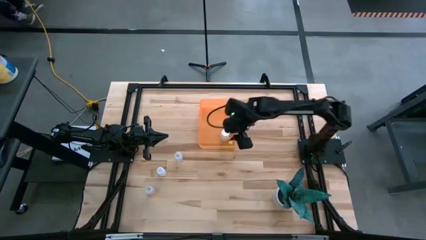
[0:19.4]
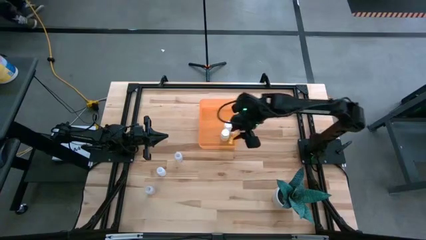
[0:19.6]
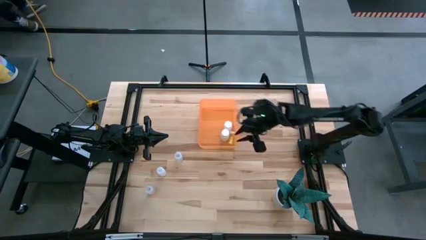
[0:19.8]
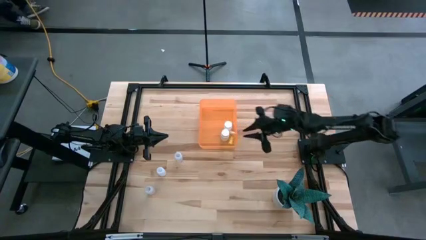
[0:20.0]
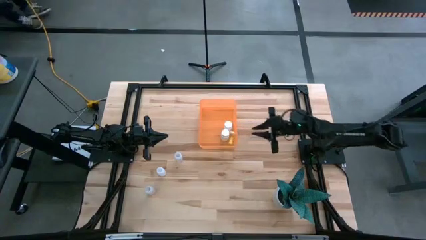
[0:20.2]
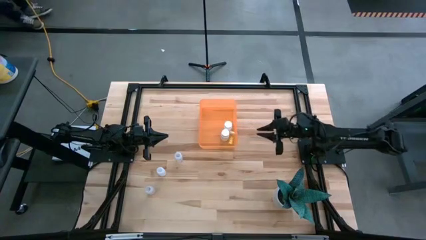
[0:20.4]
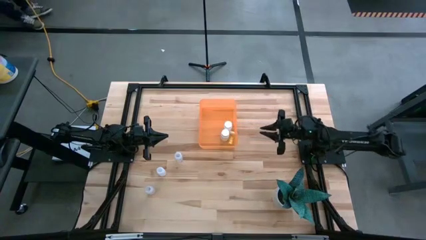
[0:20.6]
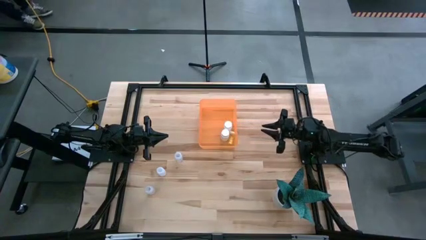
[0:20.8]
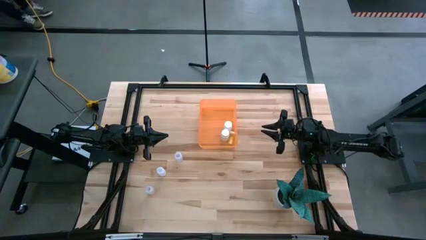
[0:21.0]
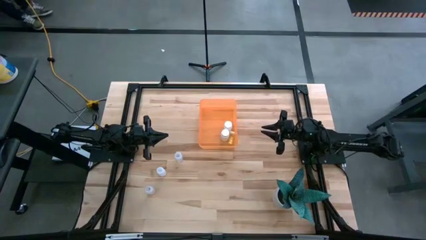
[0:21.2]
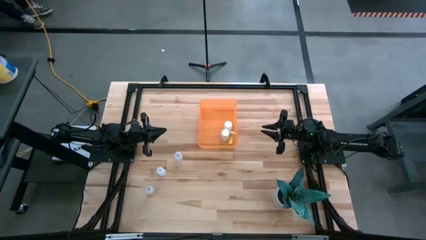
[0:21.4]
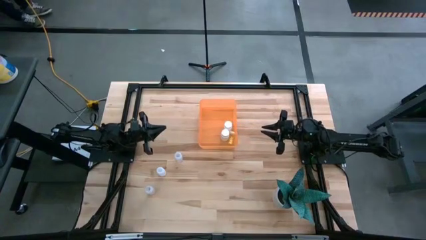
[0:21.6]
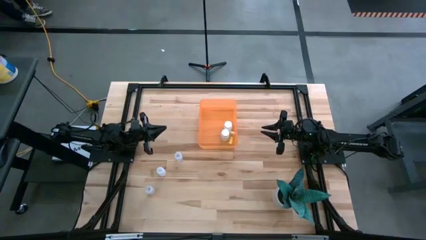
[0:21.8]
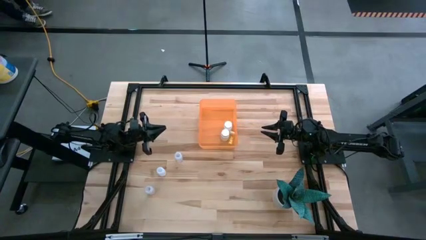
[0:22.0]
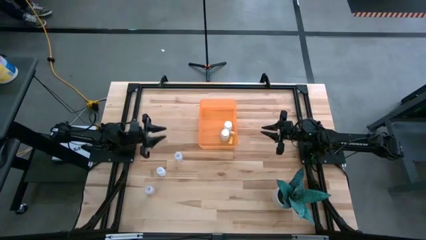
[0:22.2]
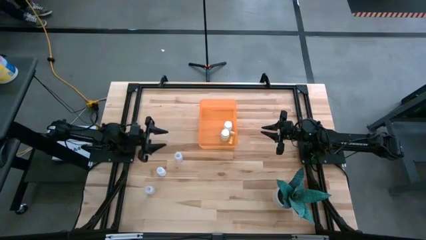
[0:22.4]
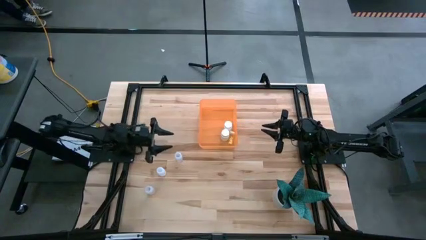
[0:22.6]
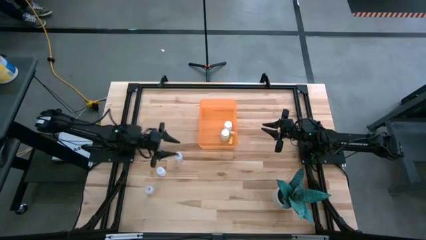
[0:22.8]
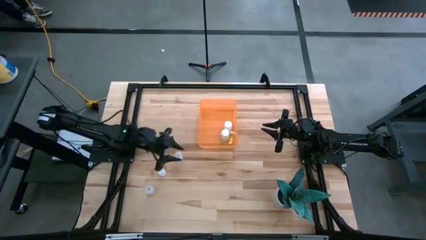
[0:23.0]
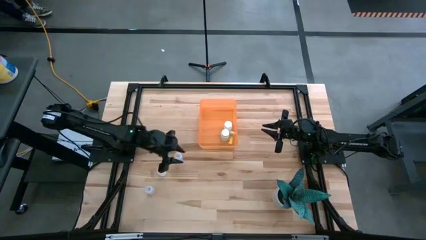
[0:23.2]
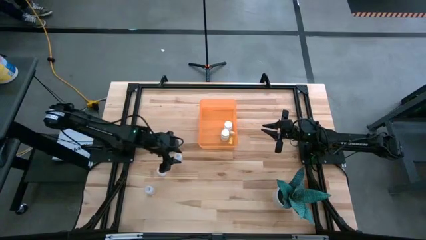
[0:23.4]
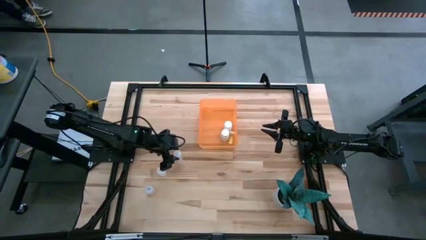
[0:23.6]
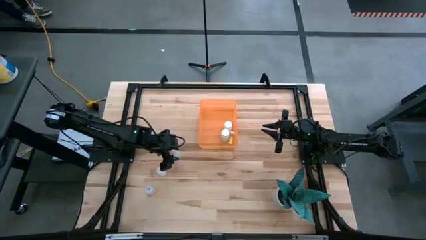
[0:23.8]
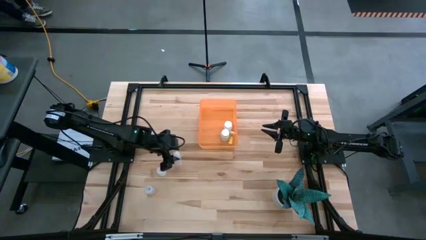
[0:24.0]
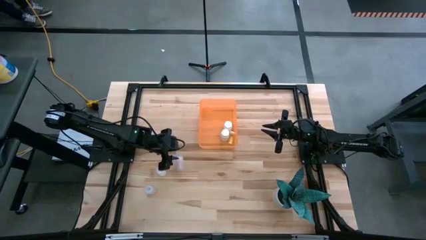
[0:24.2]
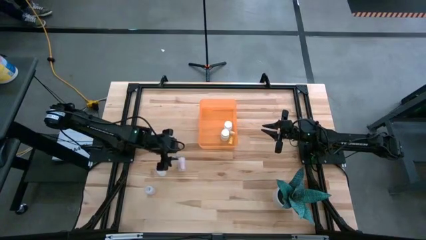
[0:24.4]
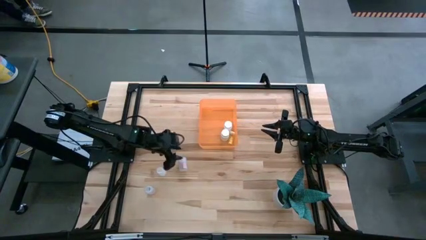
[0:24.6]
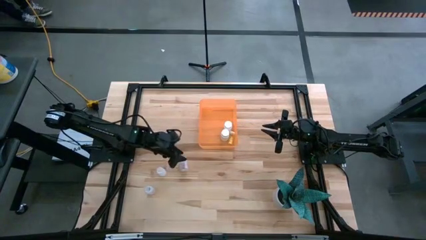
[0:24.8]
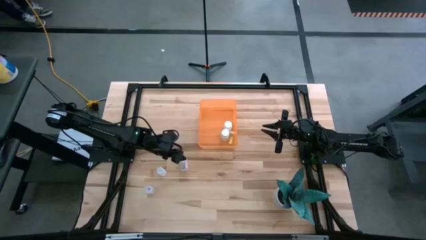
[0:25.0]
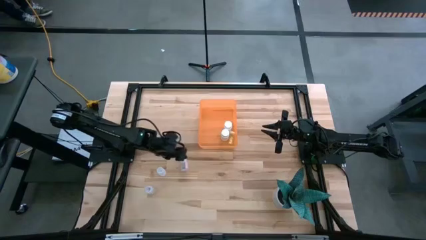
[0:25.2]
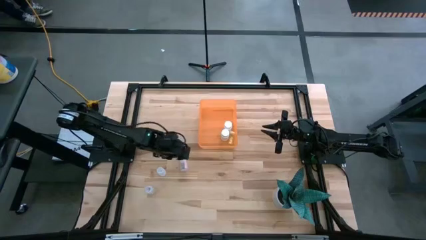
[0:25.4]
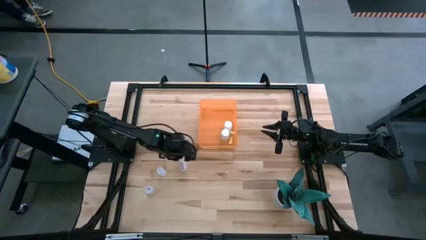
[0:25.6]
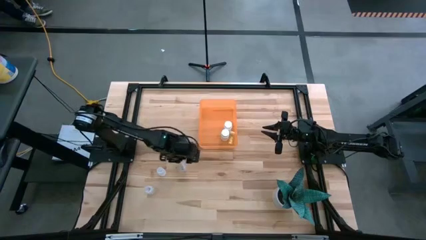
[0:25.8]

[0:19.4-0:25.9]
Task: Pick and place pill bottles into a basket
Put the top transparent medicine bottle into the orange bin

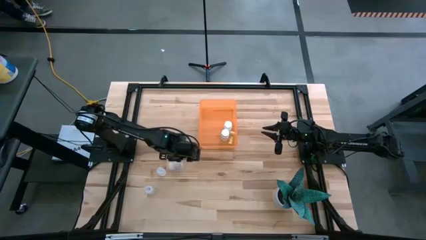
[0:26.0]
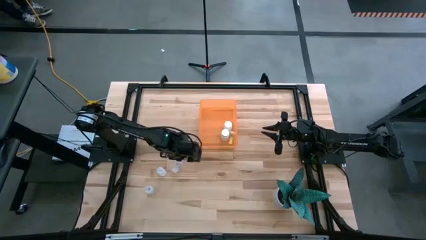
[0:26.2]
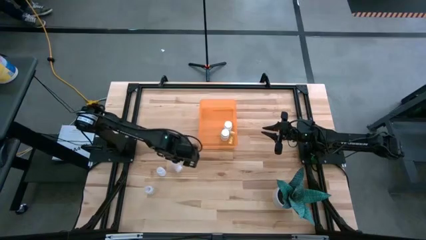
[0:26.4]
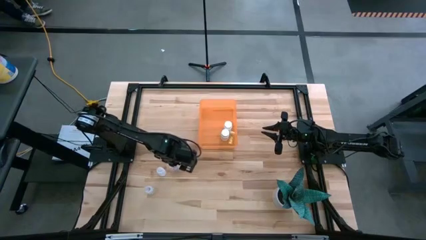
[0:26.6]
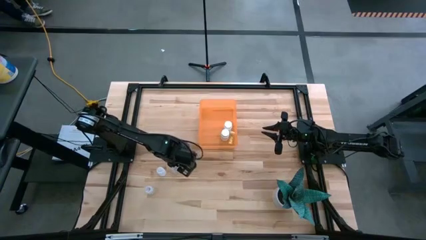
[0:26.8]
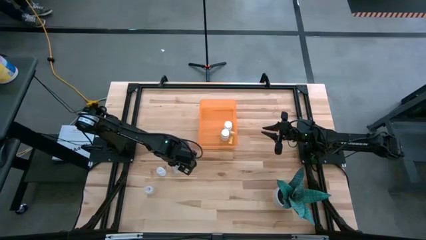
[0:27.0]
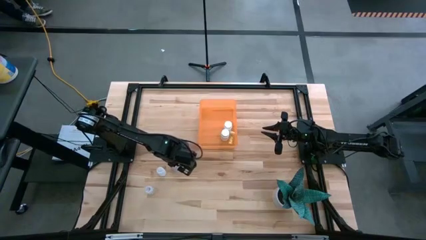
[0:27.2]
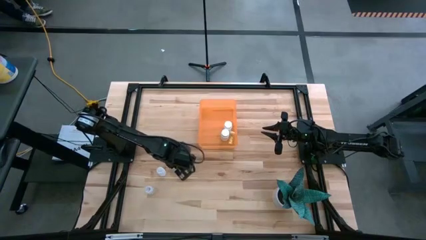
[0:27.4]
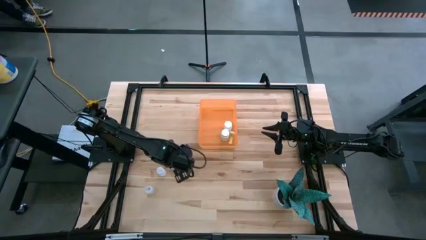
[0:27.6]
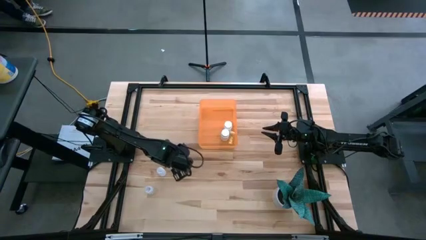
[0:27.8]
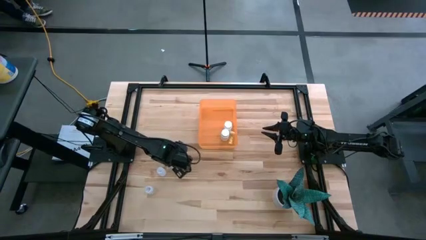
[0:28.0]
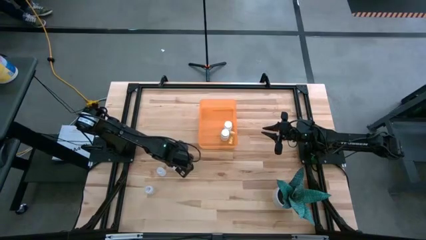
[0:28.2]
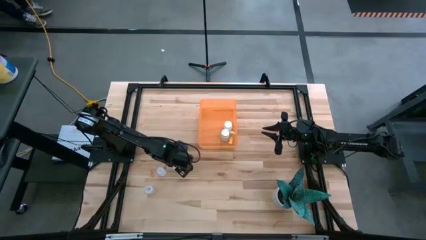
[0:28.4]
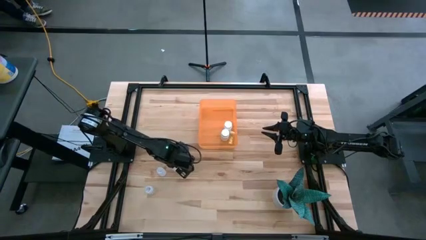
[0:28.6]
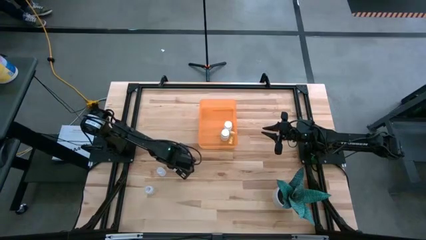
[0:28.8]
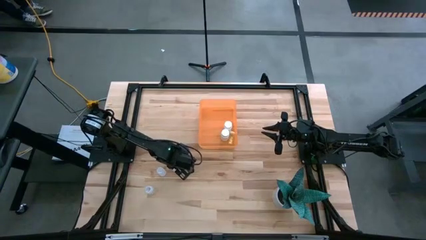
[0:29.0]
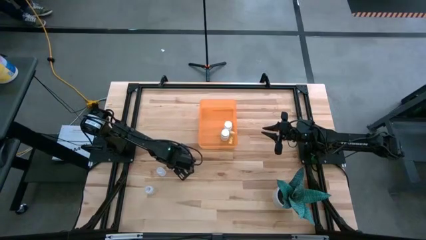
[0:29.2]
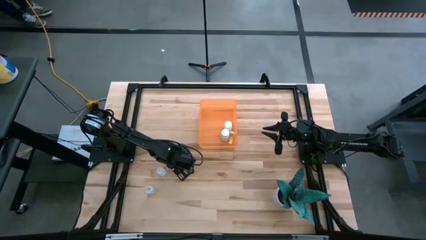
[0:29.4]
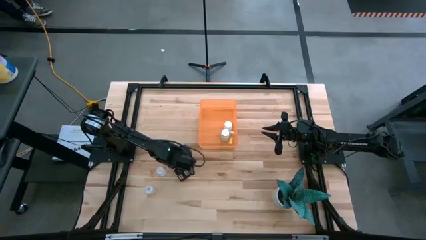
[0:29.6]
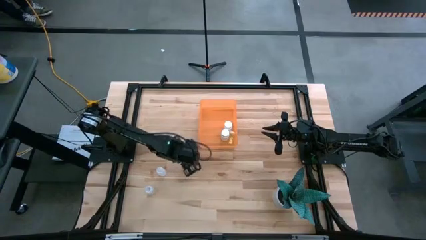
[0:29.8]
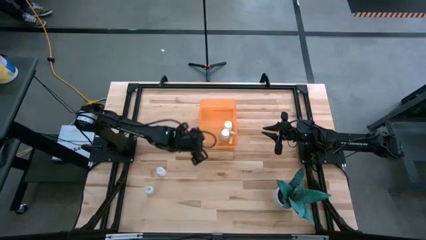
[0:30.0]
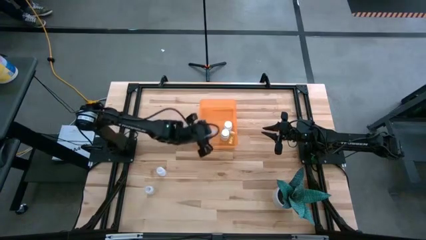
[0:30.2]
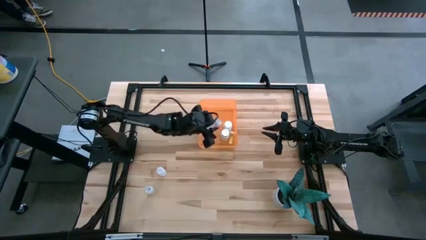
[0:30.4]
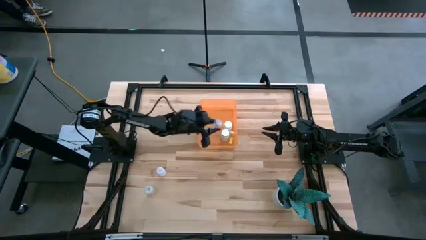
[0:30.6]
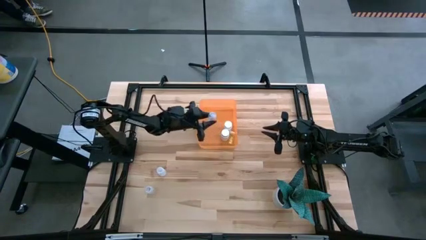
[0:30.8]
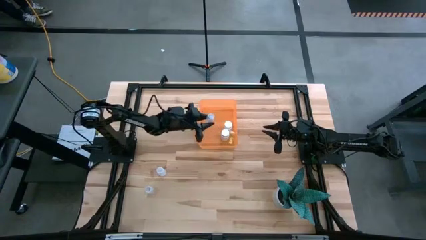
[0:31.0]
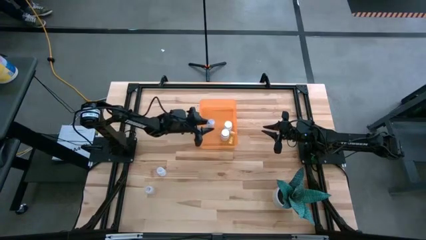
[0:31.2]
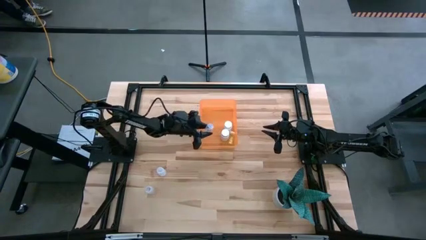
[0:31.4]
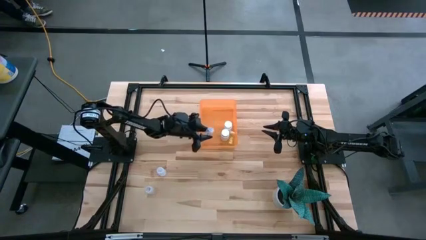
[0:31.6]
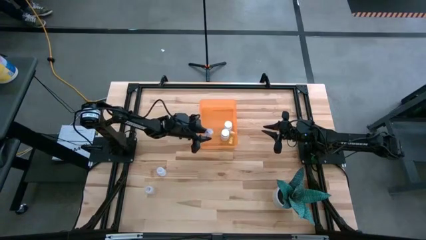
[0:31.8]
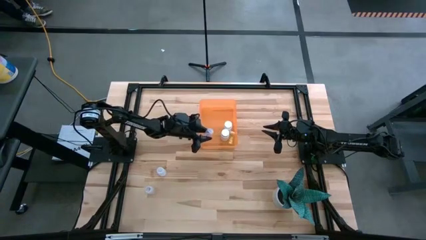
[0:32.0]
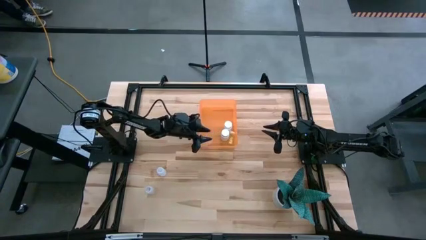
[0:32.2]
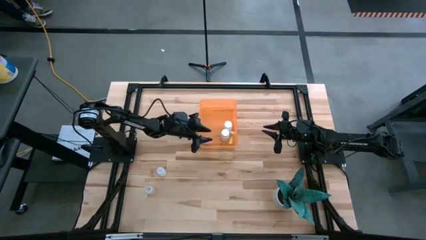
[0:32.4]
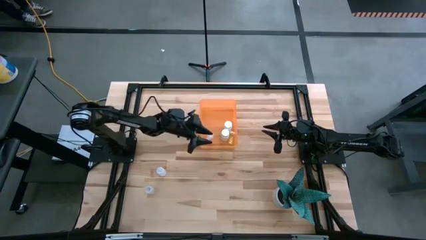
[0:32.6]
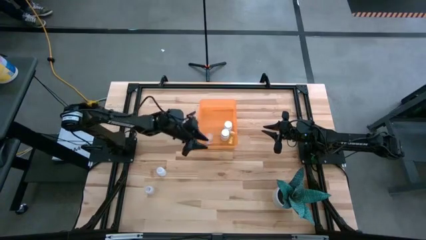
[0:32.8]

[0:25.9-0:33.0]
Put the top transparent medicine bottle into the orange bin

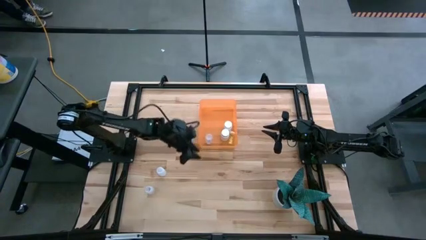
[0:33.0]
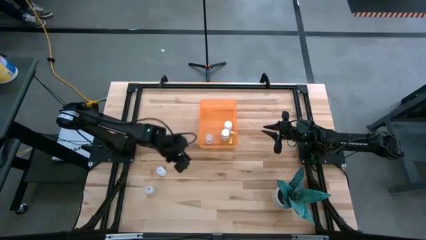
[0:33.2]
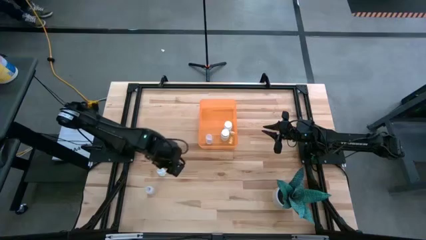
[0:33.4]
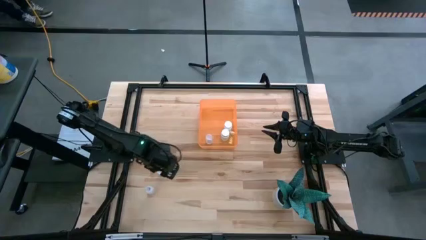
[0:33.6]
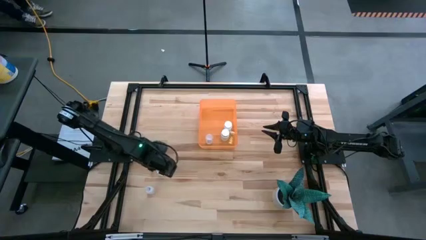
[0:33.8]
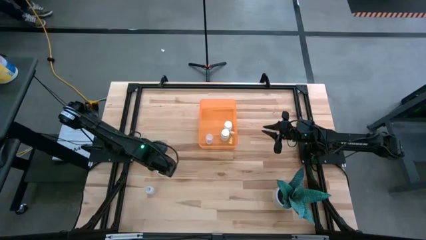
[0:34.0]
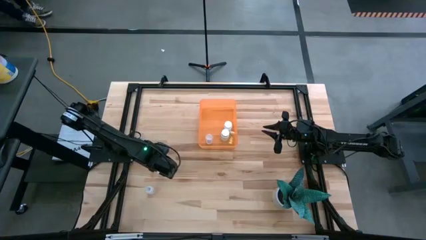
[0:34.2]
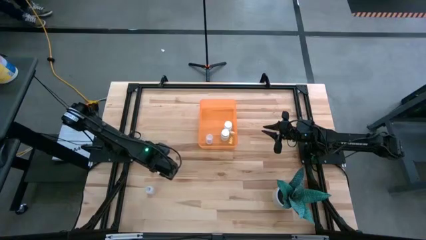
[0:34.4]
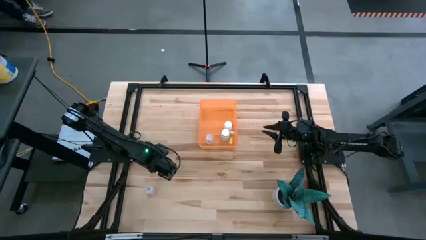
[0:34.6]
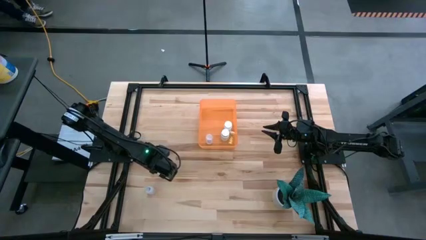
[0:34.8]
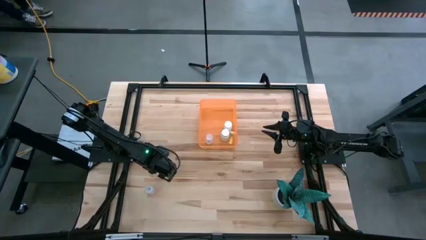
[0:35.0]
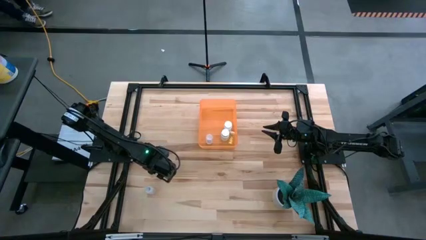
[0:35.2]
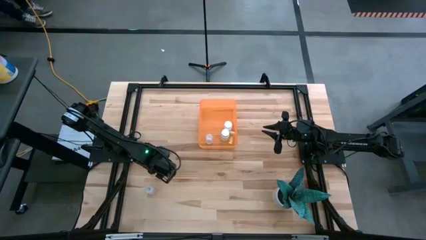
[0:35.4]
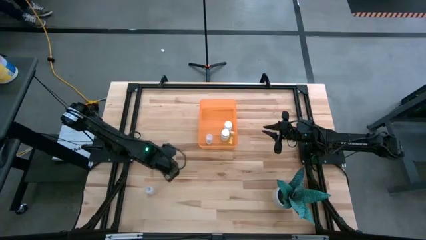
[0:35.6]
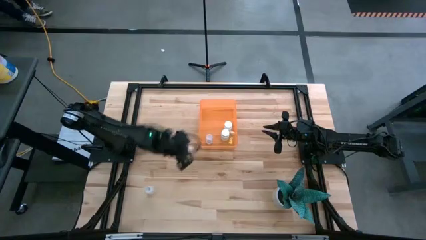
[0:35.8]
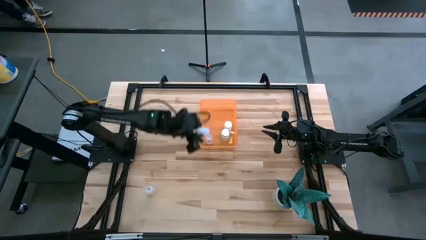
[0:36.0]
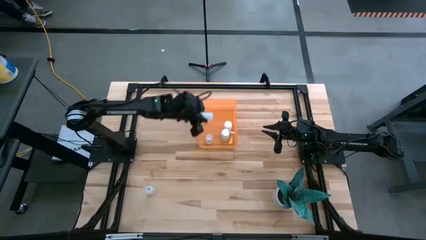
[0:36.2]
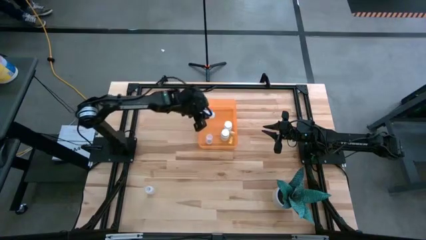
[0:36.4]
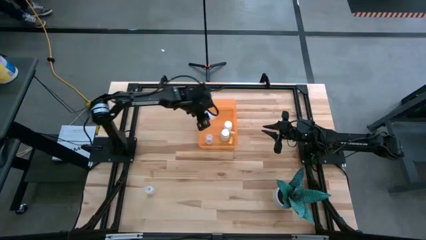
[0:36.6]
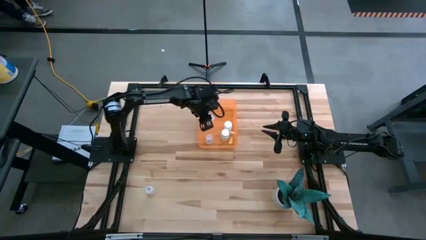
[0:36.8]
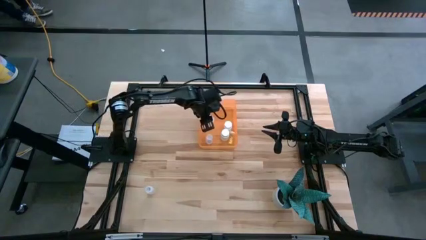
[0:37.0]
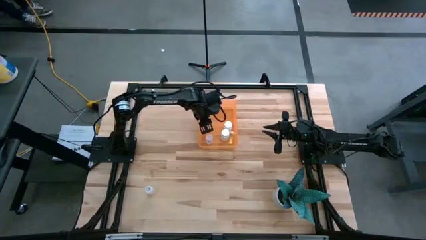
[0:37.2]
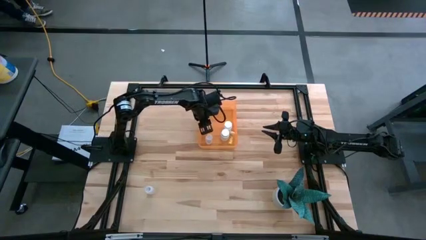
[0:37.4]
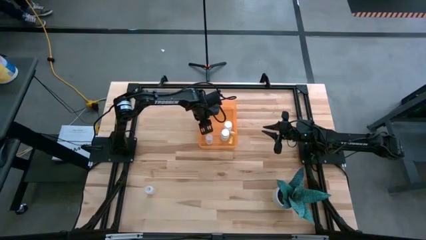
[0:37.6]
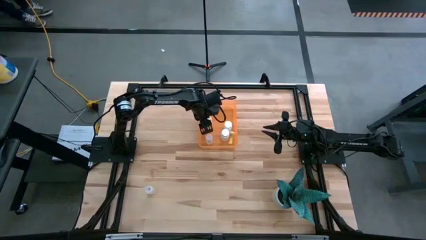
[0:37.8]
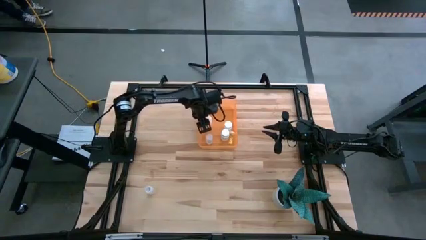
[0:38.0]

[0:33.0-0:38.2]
Put the white medicine bottle into the orange bin
